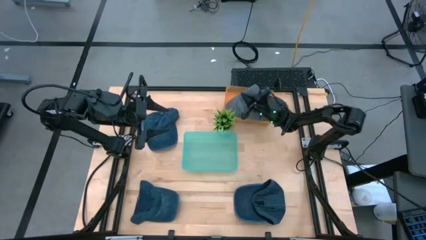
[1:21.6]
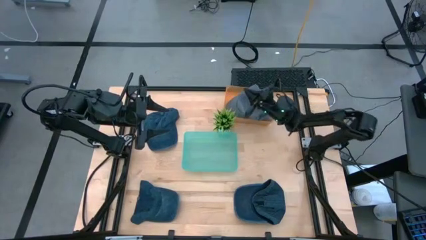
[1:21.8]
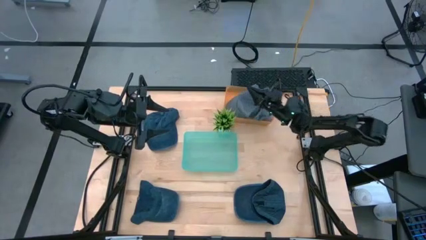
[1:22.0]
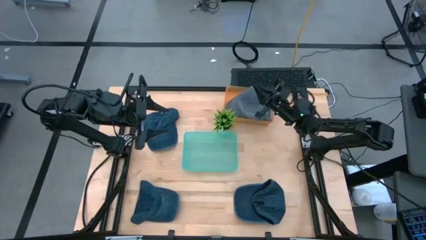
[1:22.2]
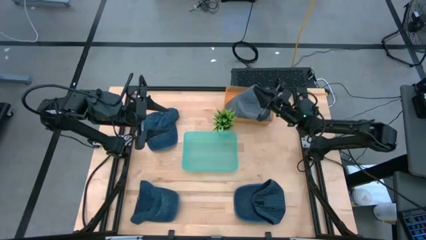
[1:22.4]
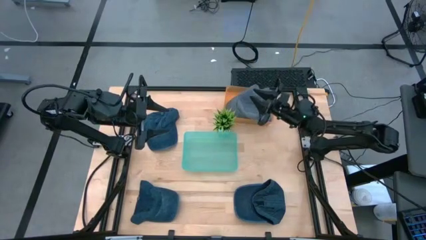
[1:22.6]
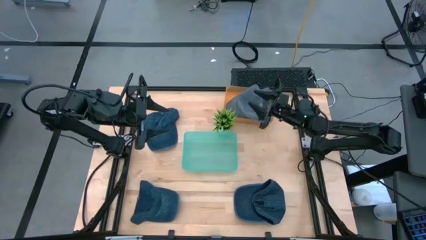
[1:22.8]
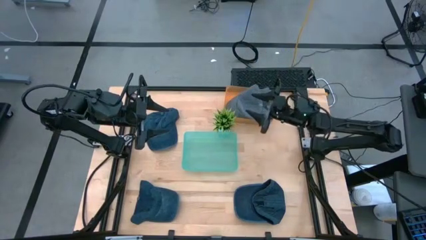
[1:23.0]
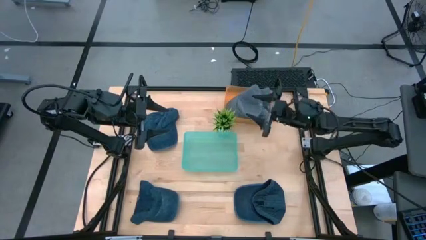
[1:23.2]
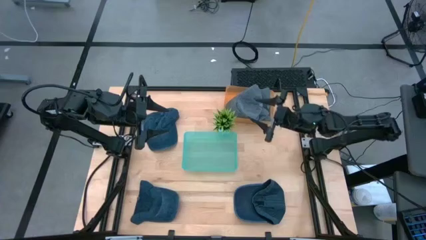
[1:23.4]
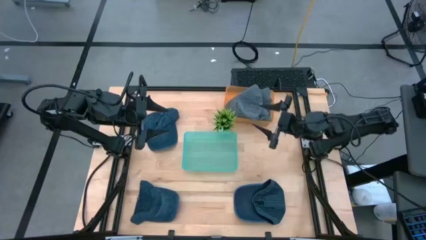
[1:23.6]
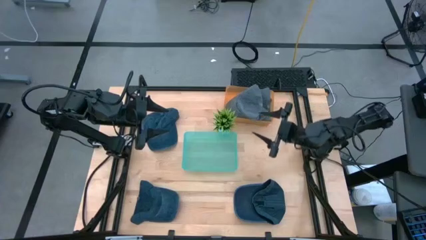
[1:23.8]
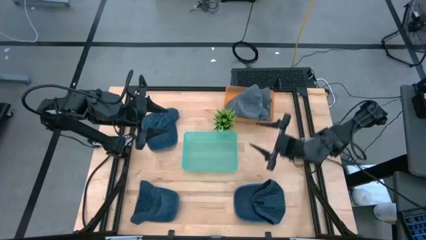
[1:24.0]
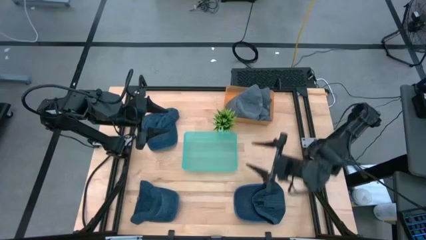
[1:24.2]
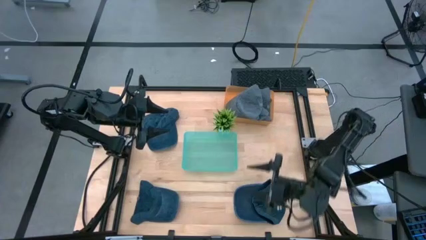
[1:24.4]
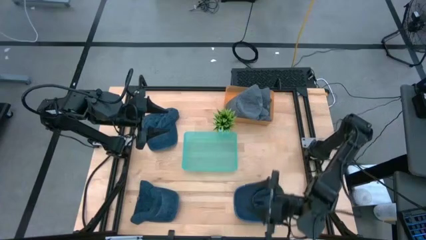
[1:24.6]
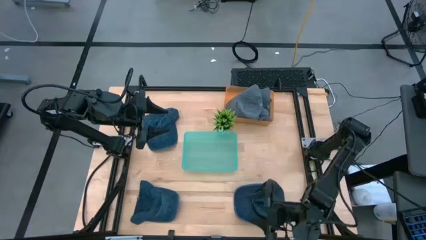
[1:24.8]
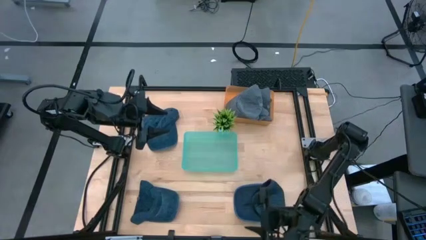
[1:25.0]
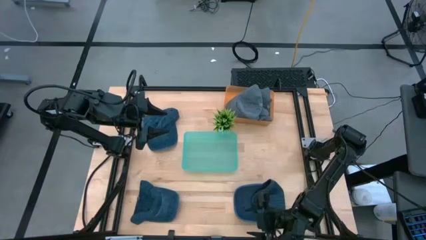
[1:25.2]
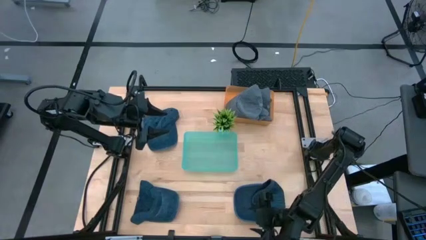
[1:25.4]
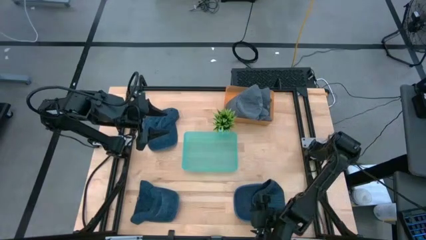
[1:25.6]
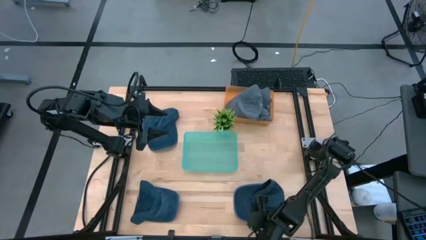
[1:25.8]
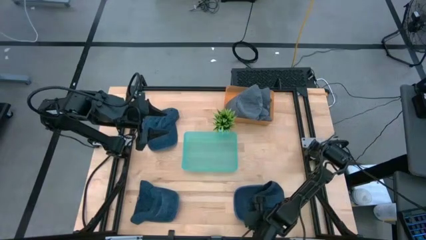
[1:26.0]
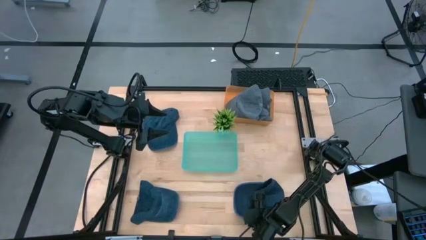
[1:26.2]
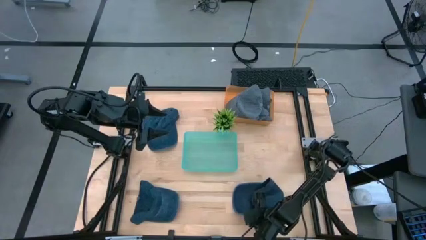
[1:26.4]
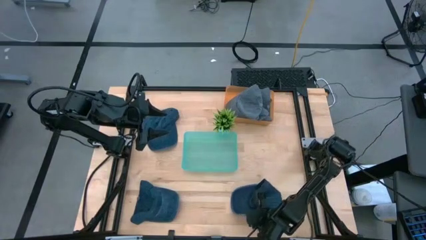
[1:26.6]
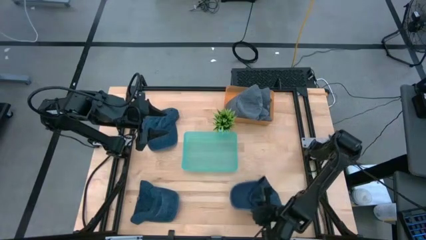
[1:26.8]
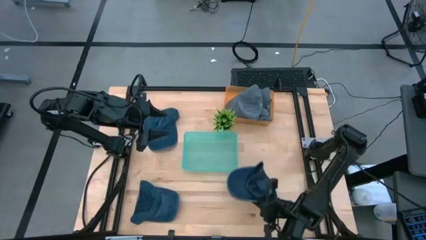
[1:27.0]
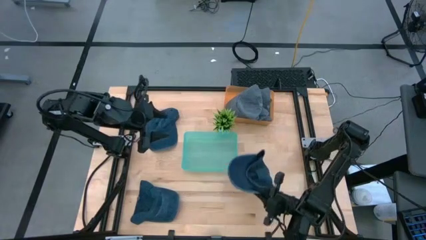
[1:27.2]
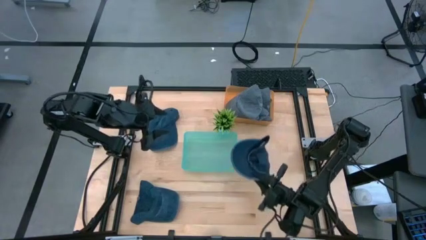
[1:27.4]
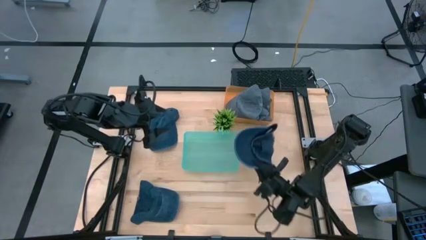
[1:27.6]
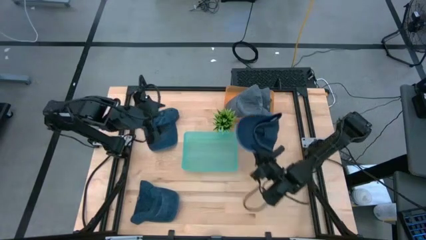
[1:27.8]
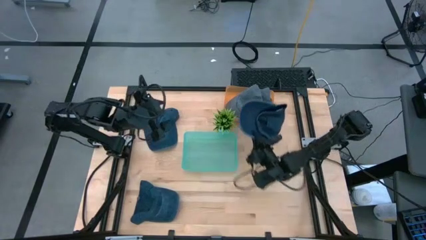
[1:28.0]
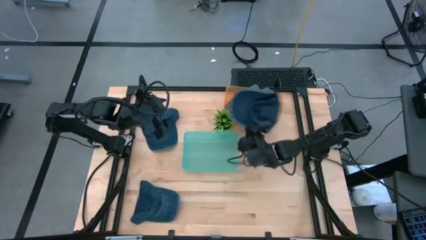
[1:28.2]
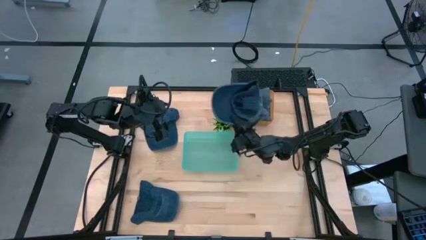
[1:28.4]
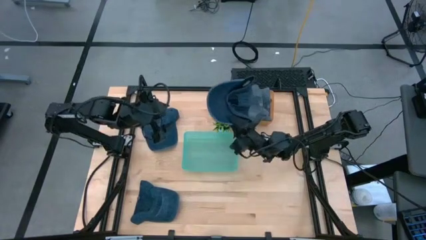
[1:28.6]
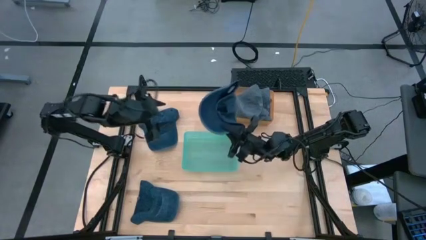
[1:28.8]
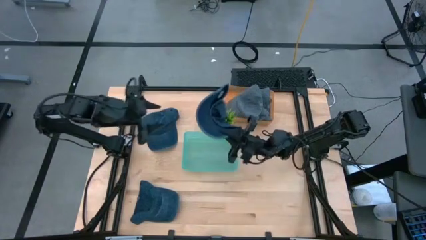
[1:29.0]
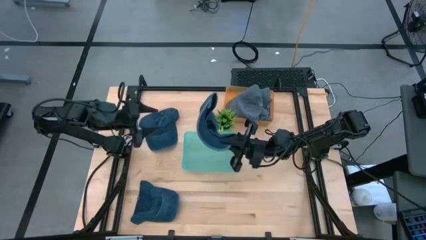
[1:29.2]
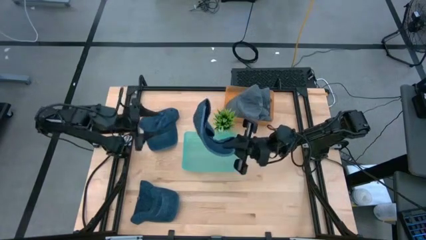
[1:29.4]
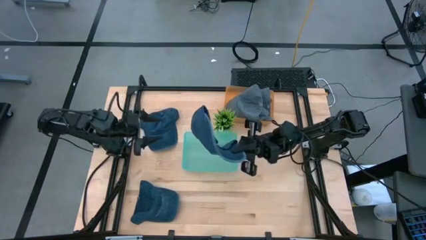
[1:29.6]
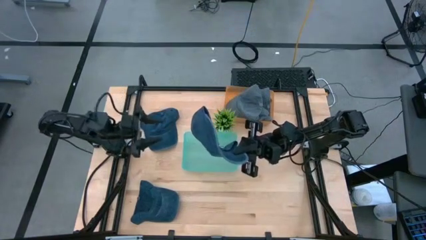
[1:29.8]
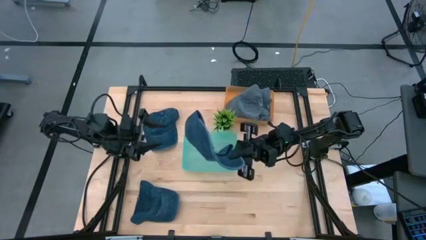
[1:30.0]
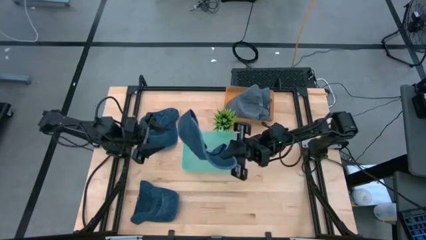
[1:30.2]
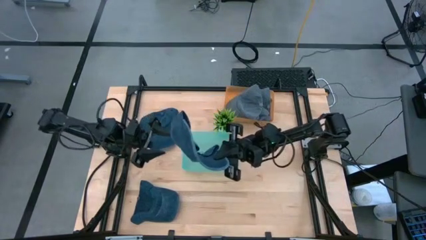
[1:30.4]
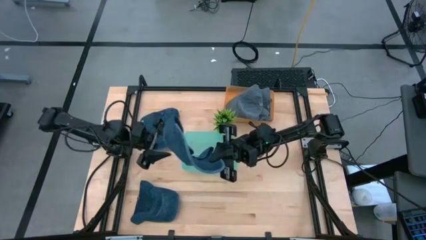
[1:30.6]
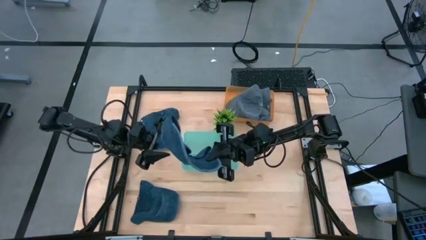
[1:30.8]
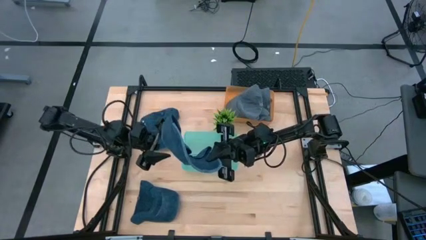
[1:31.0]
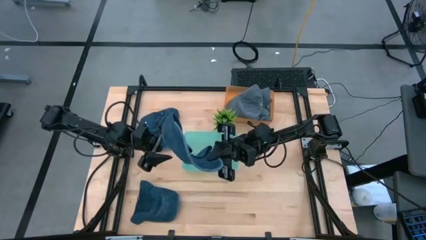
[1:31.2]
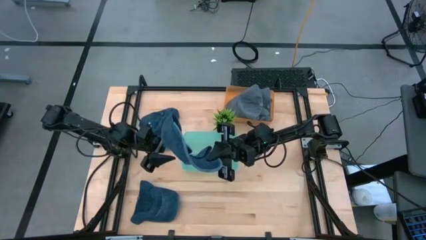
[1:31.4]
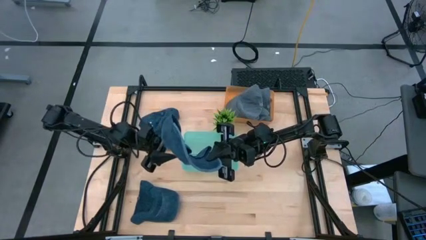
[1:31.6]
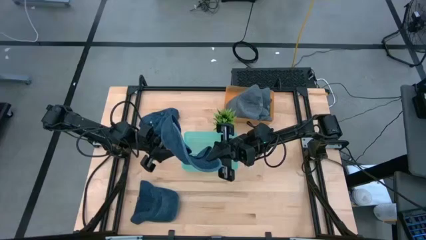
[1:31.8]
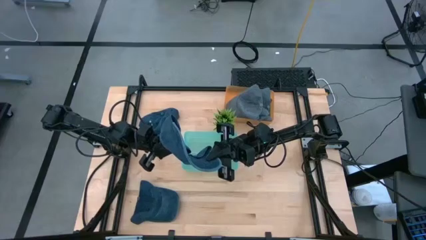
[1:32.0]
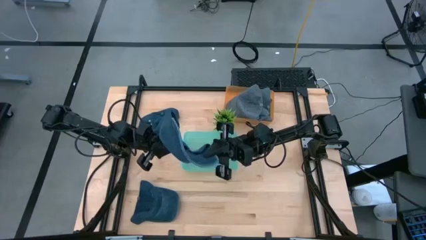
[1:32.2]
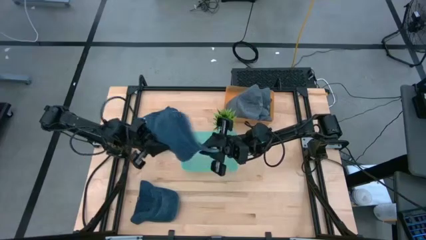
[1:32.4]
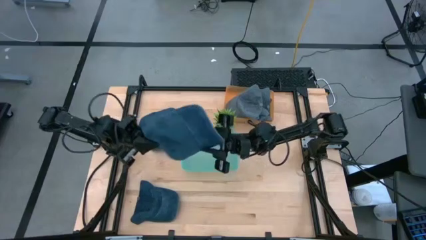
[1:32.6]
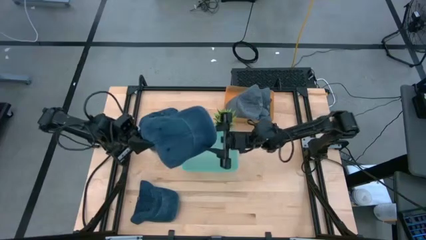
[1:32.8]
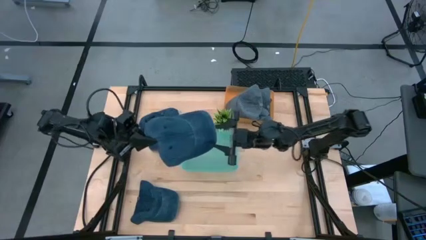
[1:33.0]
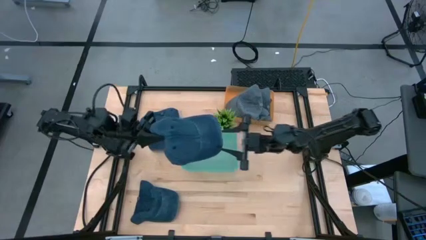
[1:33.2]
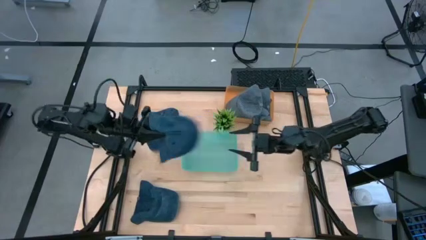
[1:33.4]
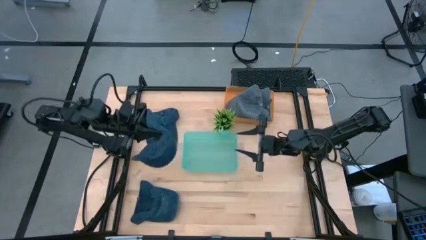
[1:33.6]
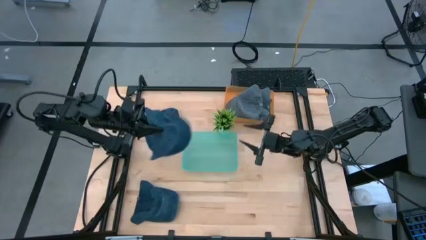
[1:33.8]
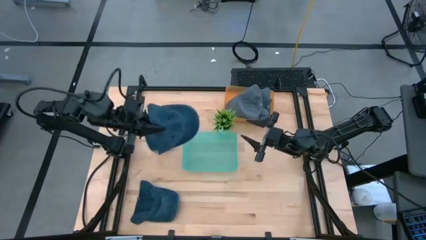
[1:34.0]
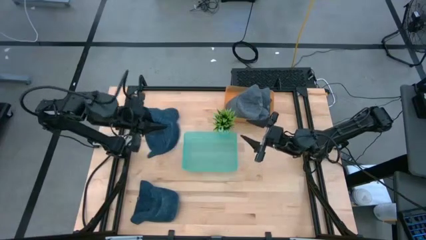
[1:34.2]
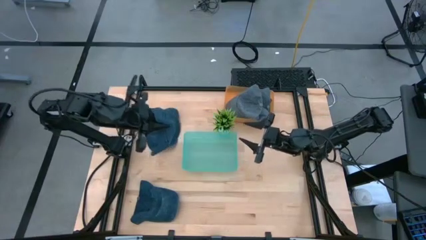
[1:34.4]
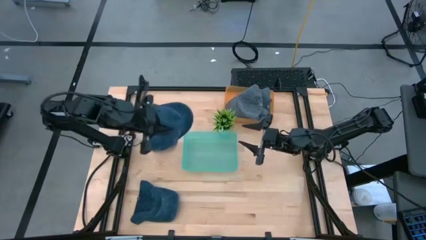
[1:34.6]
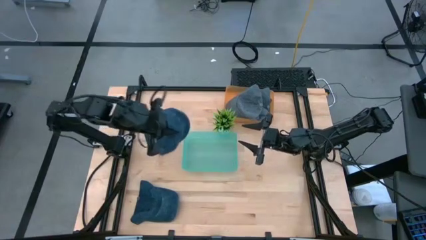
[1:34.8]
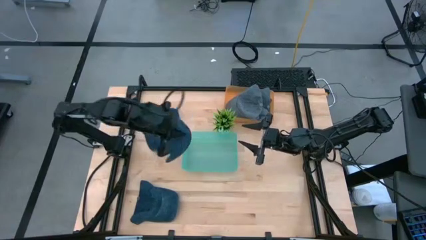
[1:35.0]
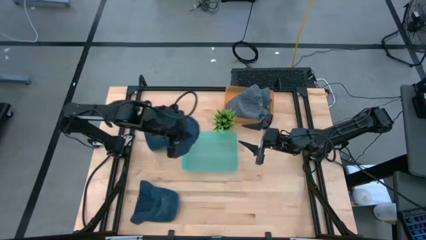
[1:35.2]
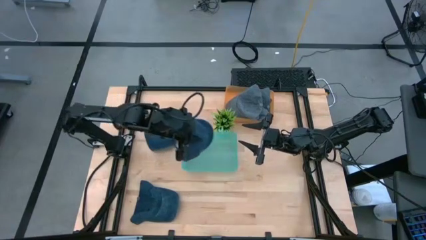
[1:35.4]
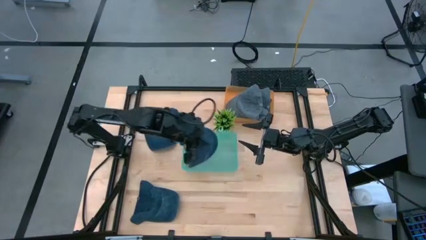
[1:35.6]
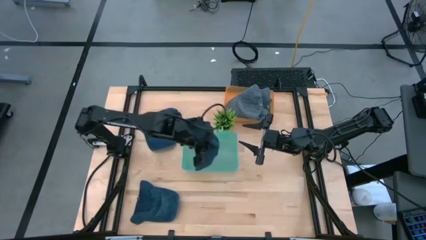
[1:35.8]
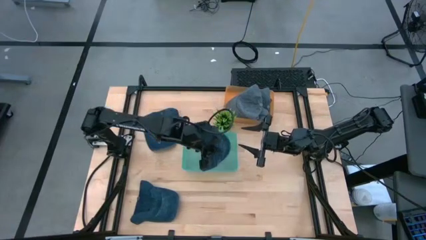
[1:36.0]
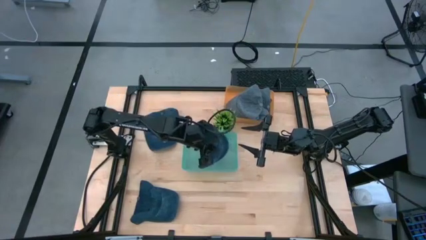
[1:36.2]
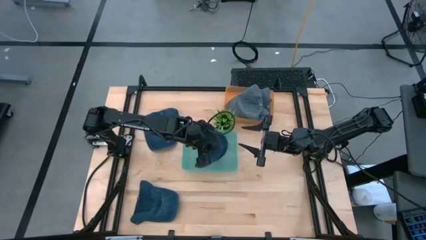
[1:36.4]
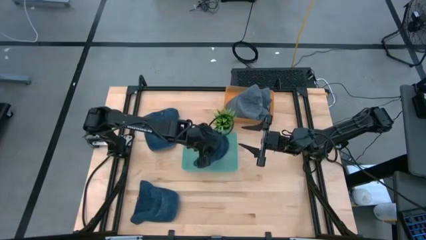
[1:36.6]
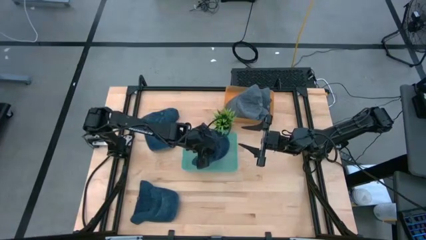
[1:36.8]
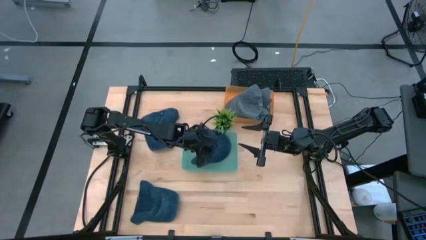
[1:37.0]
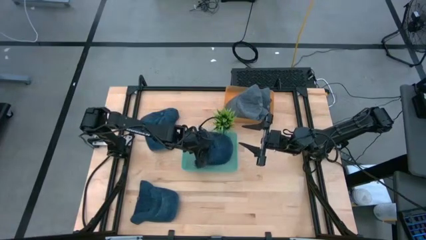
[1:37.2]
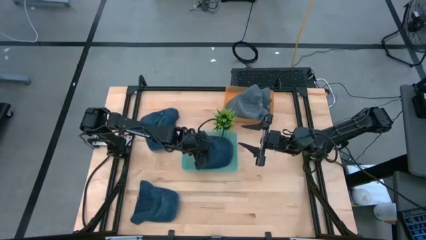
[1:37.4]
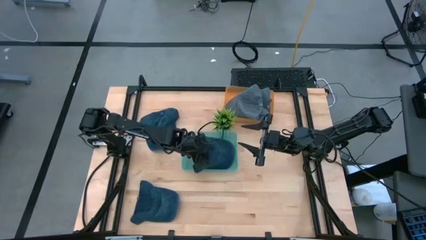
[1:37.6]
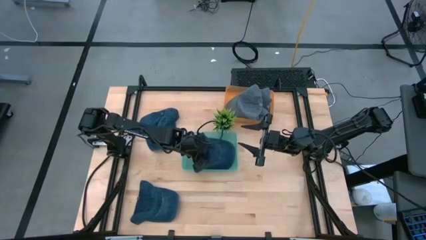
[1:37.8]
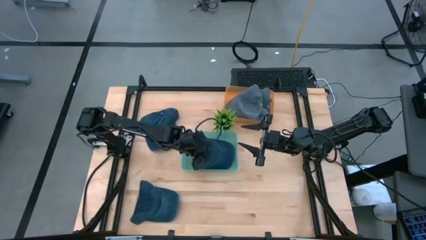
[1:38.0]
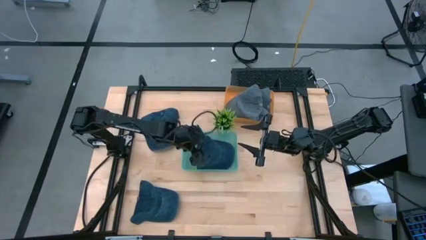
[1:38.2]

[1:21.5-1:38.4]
Task: Pick & Place hat
Put the bottom right blue cap into the green bin

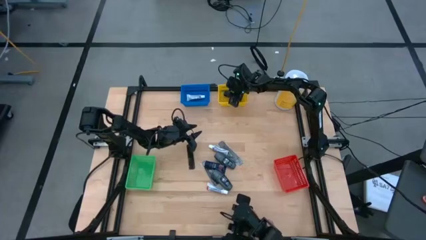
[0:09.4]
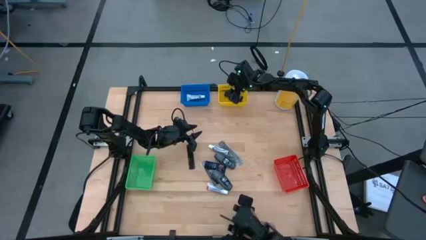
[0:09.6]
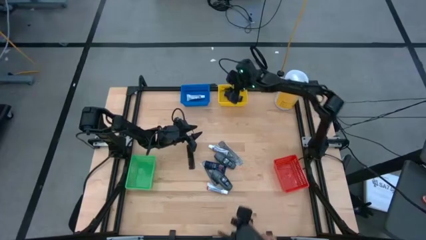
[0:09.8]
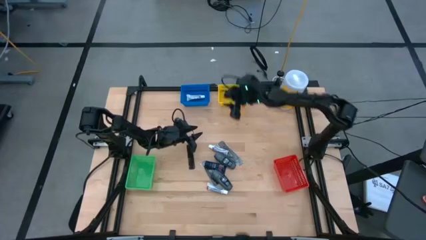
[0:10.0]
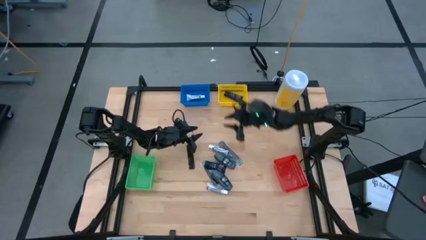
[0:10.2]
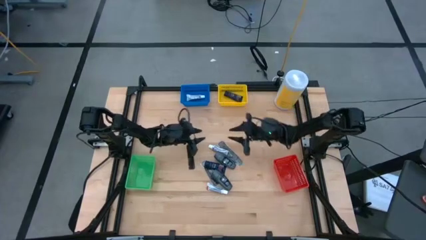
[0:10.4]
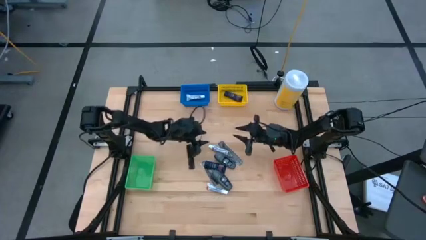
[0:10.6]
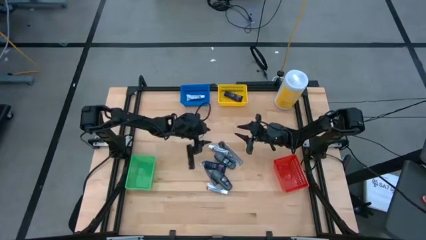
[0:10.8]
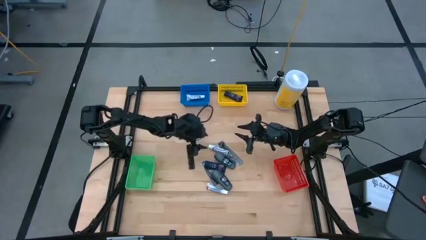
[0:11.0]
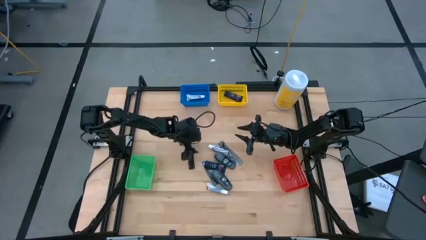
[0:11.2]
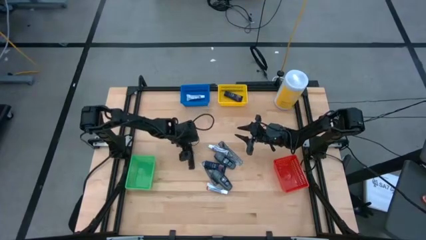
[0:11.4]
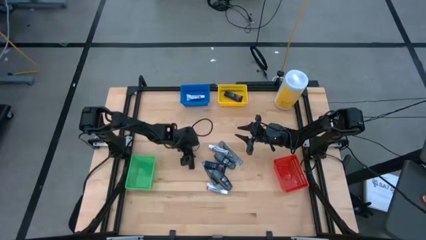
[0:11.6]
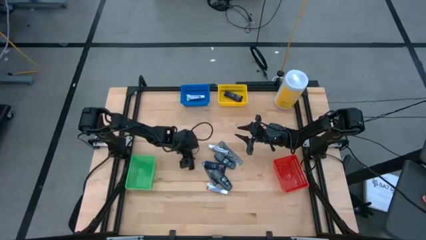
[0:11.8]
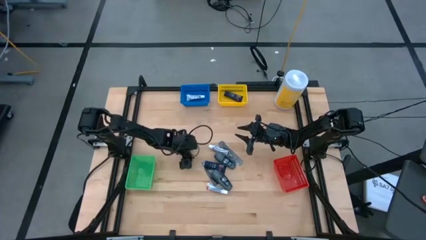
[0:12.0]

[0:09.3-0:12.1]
Task: Pick & Place Travel size toiletries
Put the black hair comb into the green bin
